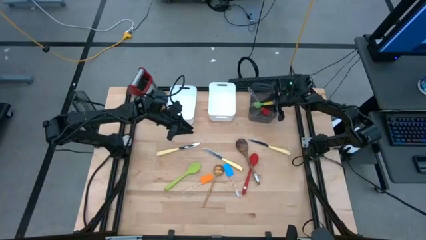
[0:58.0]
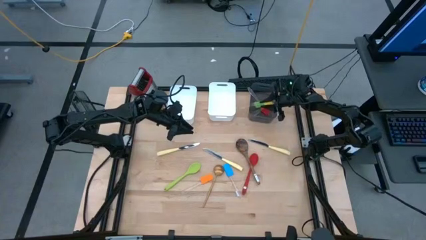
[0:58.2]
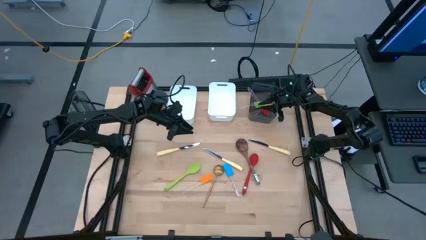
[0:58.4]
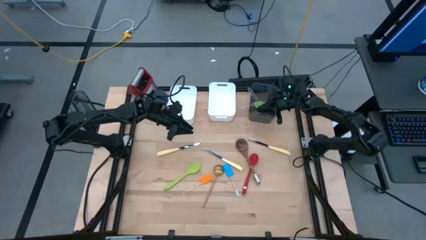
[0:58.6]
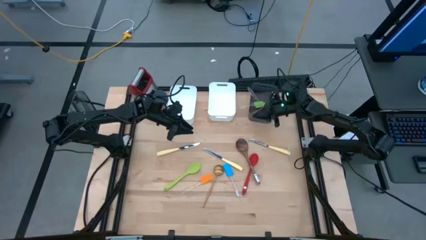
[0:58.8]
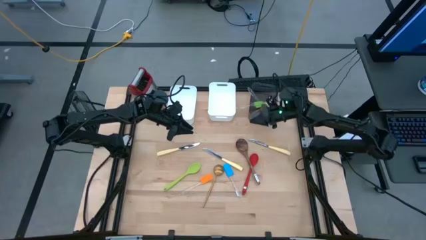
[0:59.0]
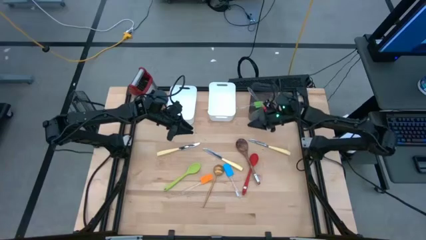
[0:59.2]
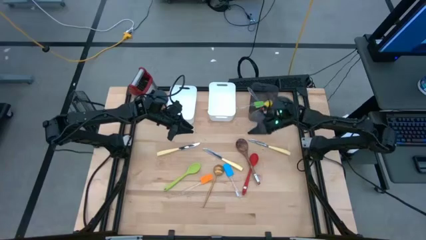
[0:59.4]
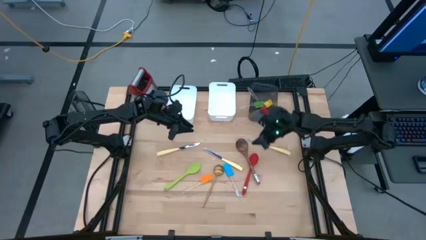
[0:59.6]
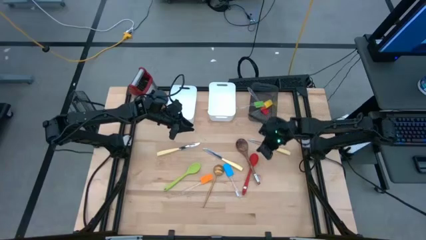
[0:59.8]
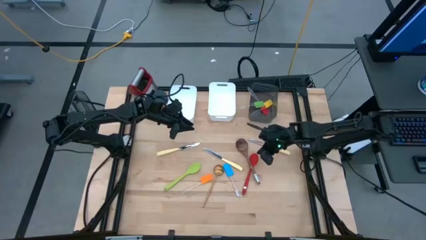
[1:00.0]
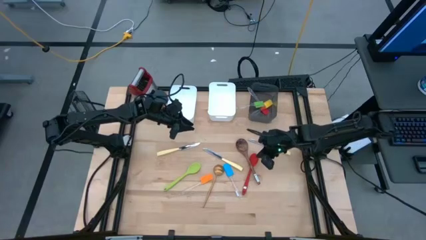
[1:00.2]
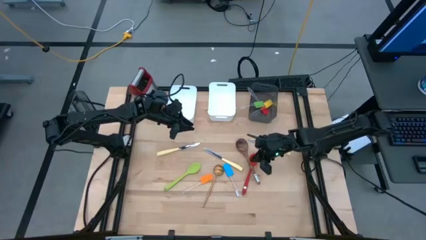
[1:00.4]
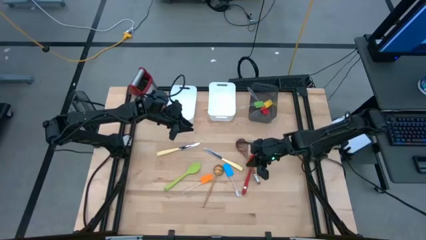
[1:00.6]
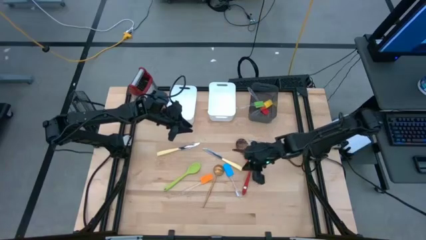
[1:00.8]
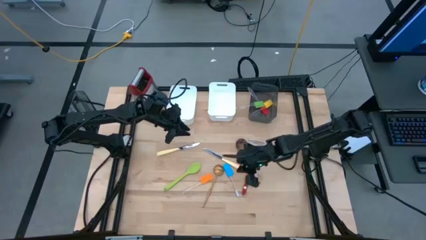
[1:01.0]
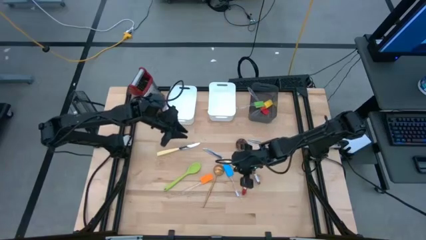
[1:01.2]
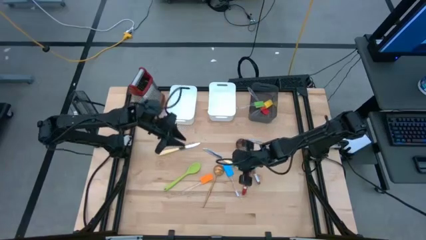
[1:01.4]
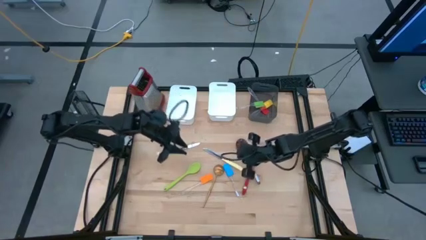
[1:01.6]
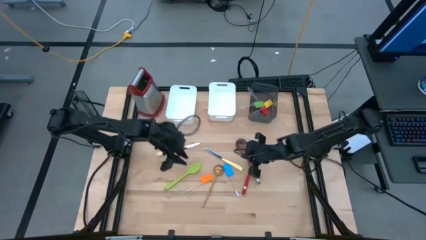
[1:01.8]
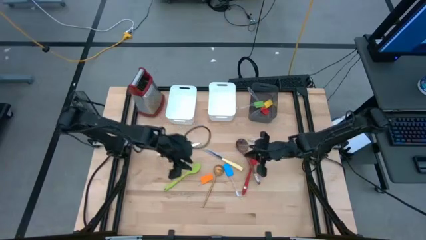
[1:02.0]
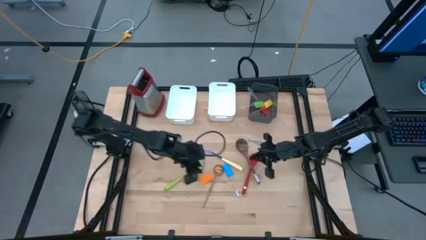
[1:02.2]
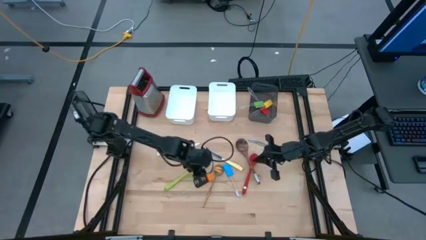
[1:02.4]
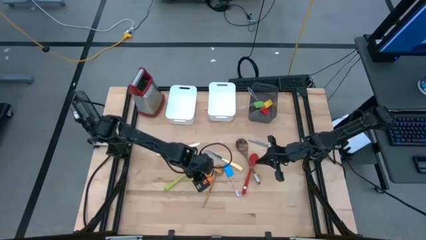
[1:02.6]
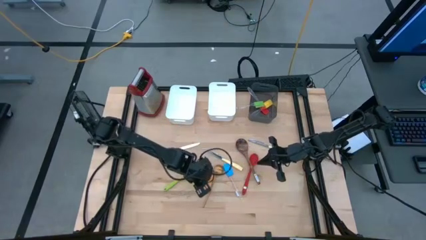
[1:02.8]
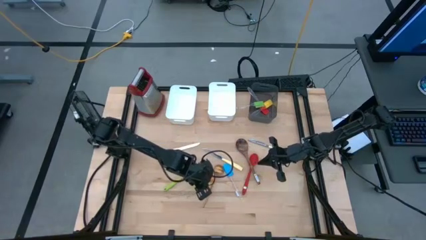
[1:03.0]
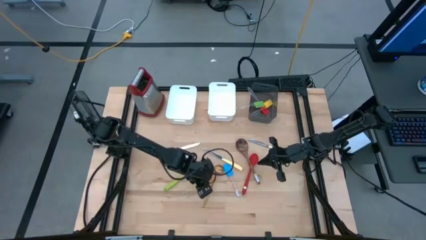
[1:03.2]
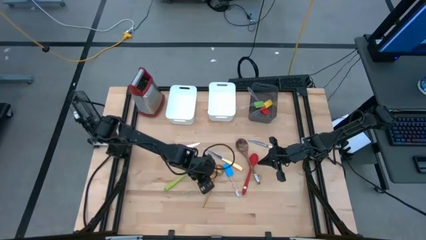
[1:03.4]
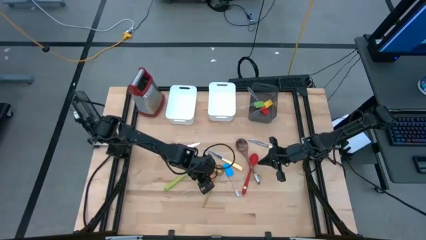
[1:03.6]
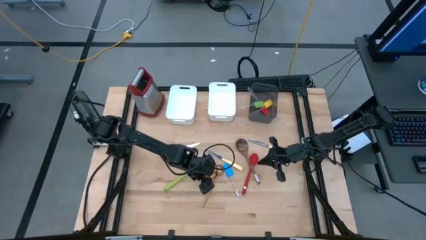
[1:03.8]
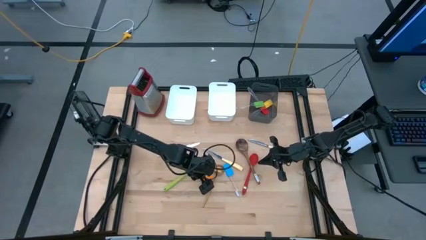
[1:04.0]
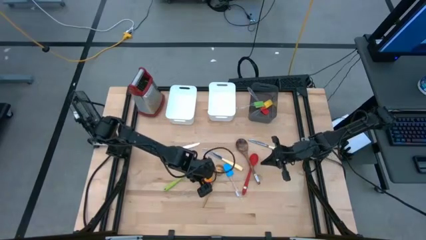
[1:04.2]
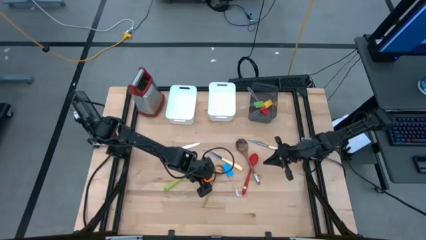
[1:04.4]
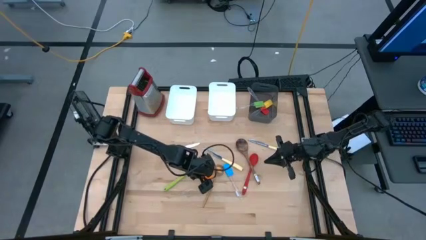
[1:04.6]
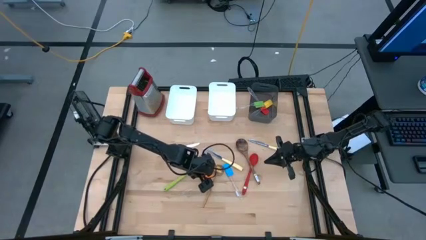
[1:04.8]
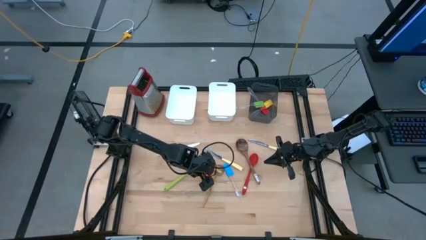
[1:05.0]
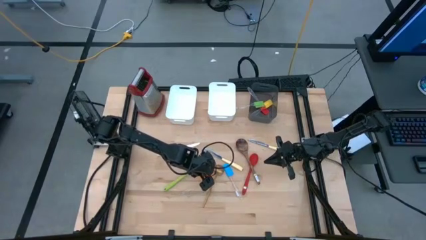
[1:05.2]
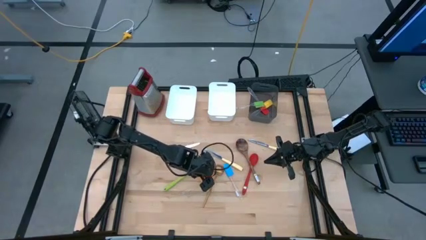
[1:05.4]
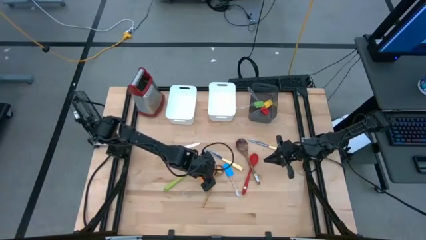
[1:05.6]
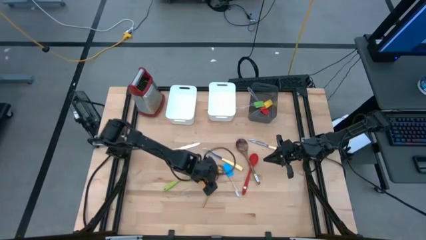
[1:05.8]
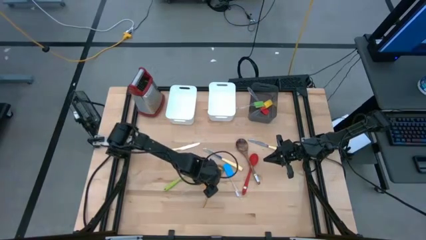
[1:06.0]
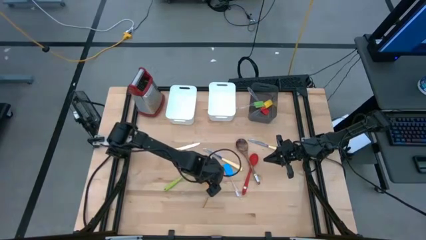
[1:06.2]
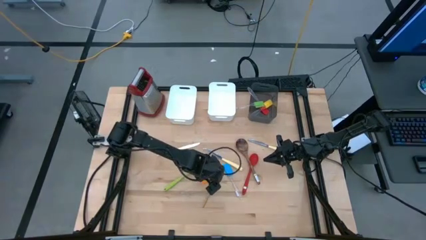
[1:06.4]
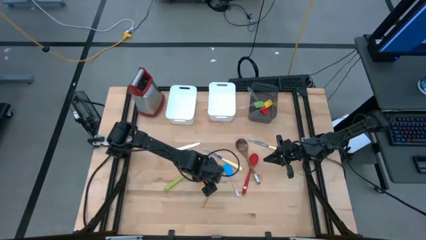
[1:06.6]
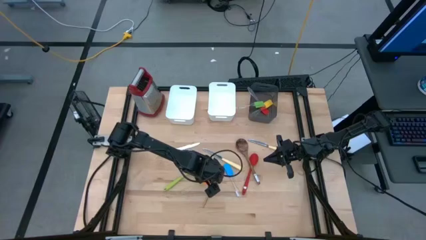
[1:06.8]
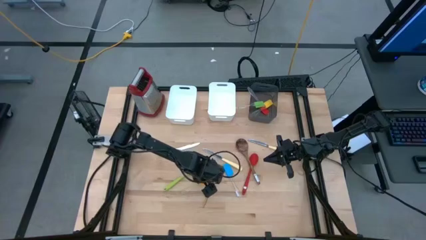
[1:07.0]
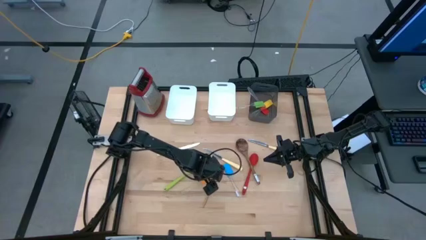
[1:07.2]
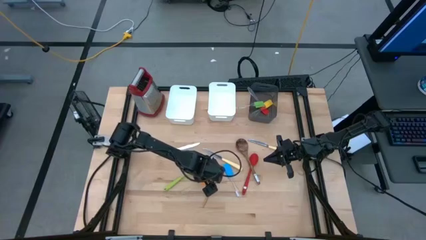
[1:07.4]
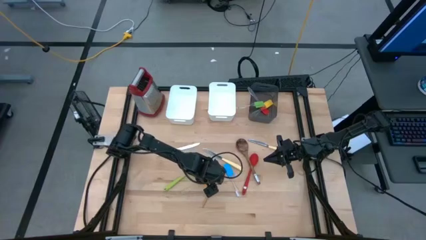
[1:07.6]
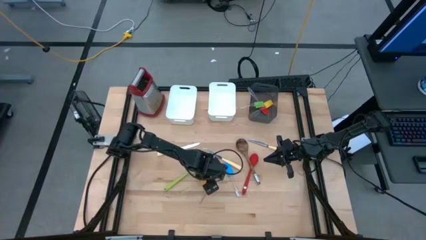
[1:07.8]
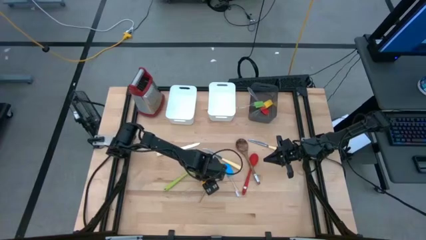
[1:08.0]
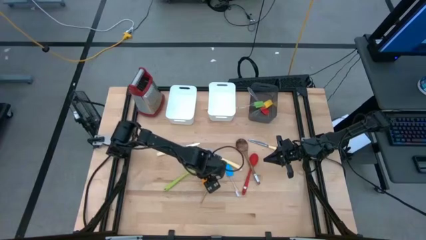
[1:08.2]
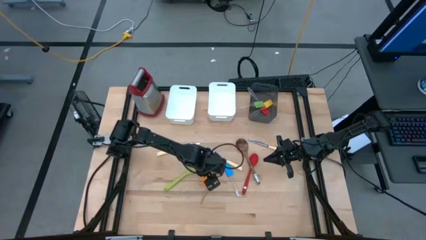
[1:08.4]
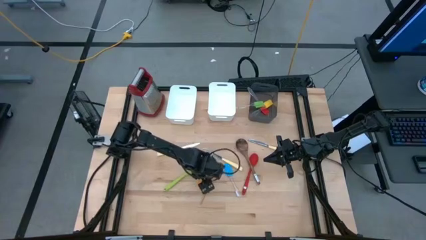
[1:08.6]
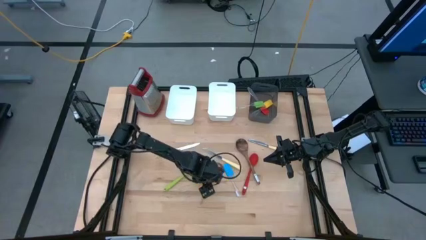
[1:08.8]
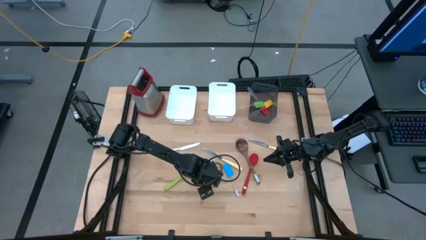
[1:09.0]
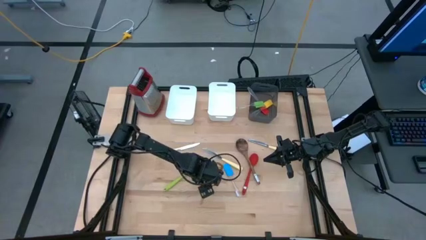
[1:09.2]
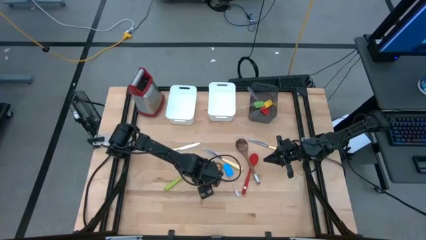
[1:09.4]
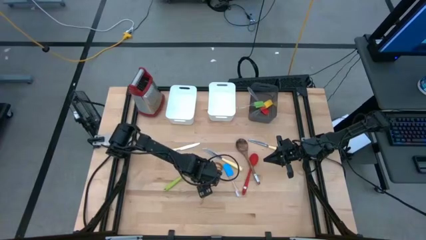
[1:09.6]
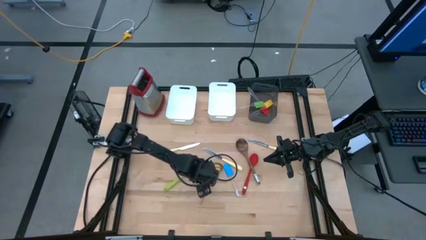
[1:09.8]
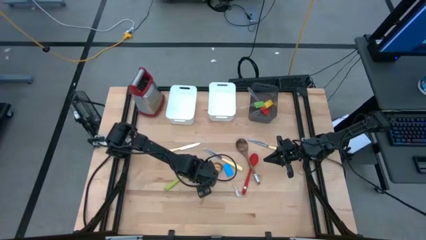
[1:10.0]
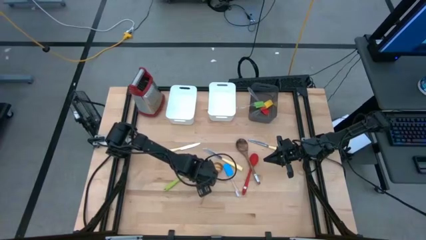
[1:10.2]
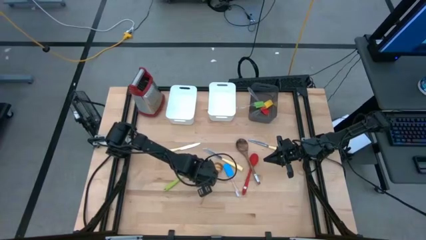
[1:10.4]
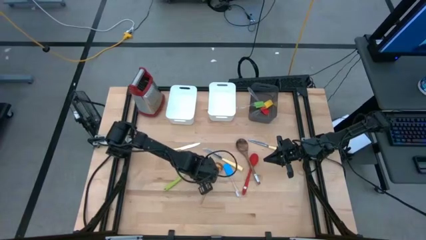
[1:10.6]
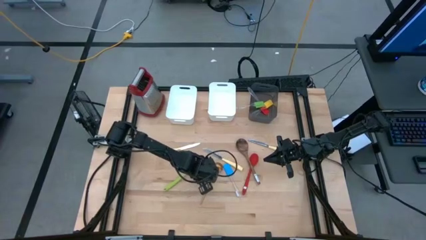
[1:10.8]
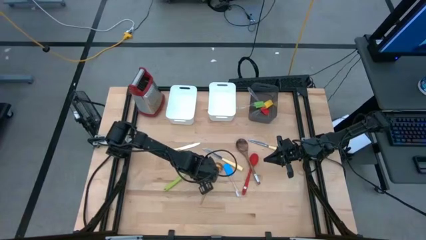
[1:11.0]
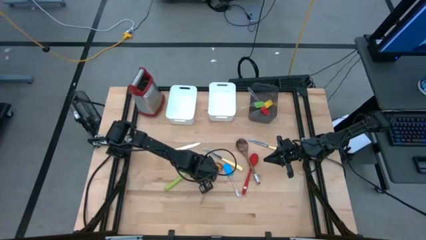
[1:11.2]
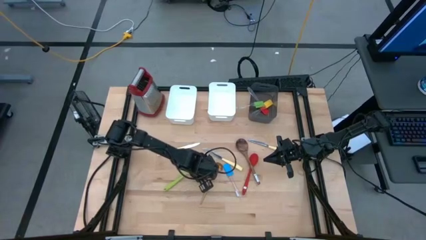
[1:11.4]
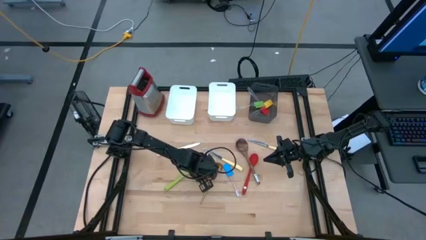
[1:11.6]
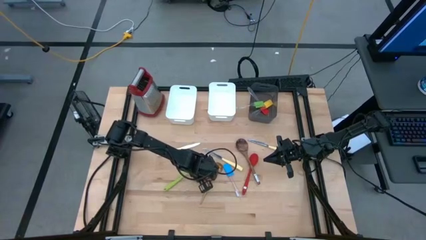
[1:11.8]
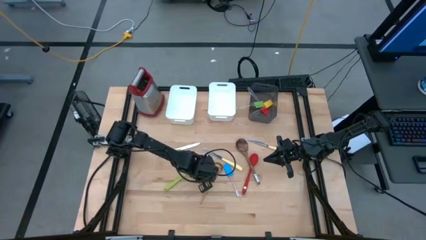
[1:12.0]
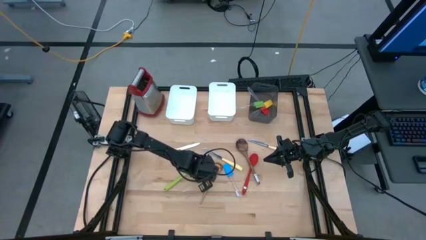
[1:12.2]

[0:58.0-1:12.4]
Task: Pick & Place Kitchen Items
Put the orange spatula into the black bin
